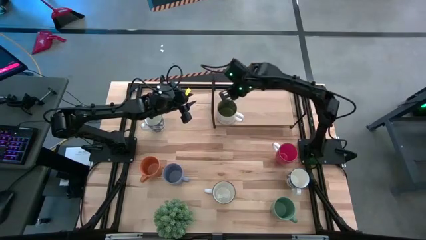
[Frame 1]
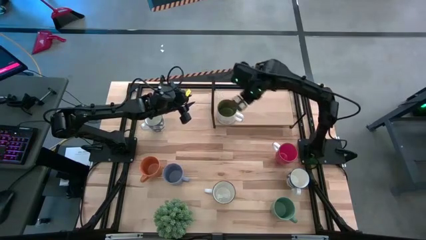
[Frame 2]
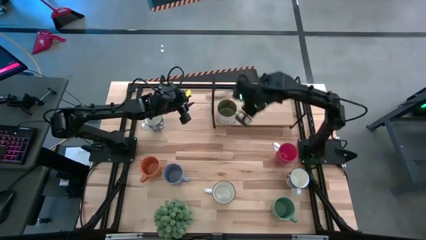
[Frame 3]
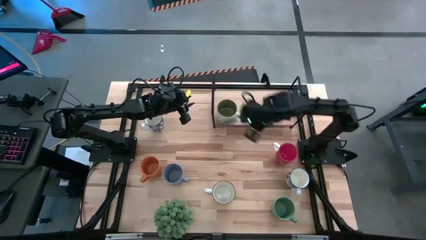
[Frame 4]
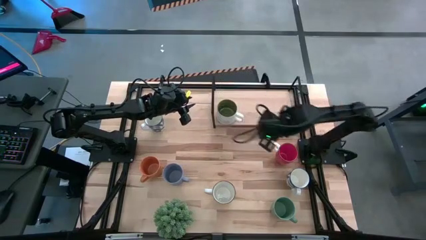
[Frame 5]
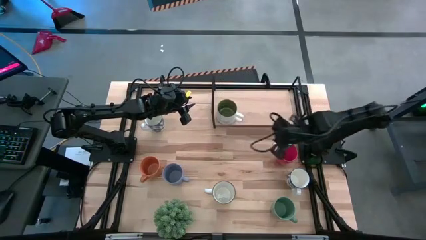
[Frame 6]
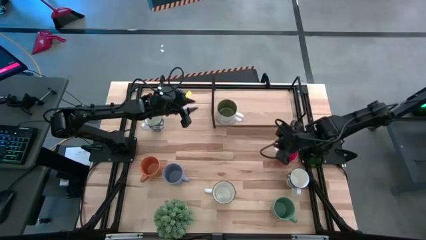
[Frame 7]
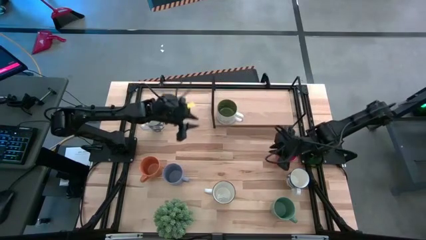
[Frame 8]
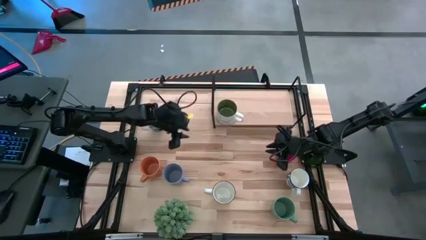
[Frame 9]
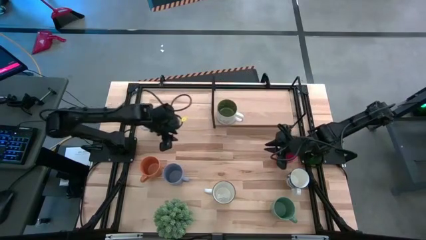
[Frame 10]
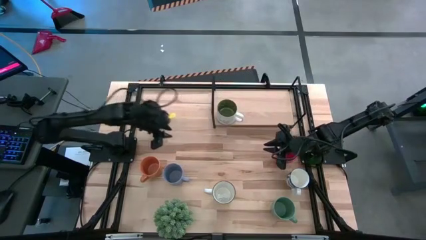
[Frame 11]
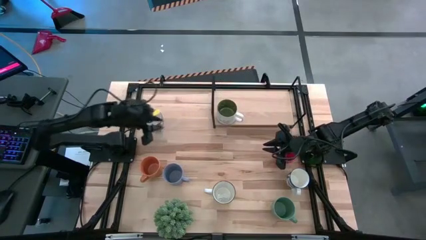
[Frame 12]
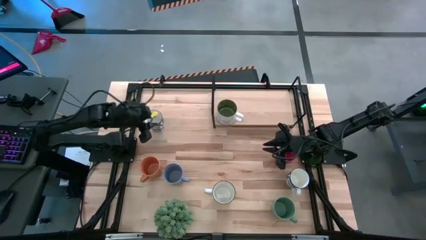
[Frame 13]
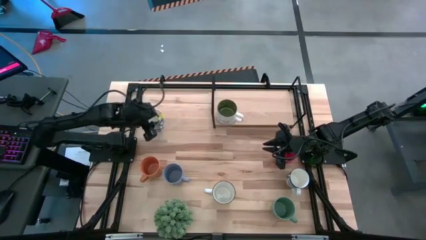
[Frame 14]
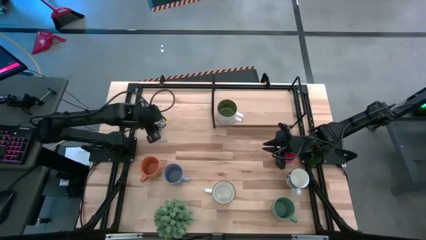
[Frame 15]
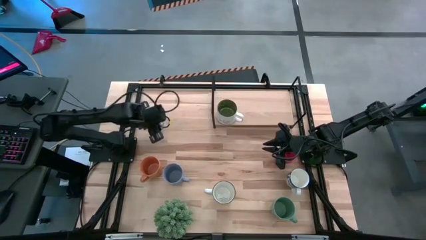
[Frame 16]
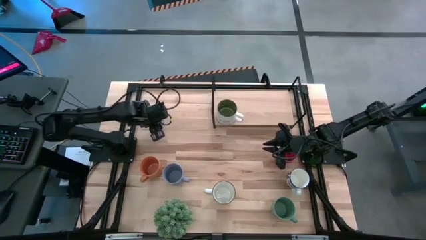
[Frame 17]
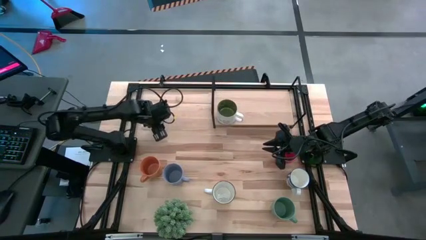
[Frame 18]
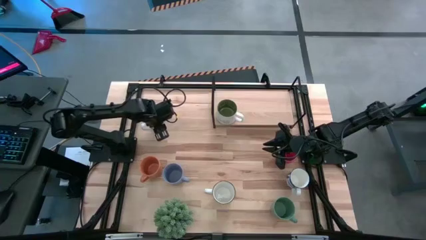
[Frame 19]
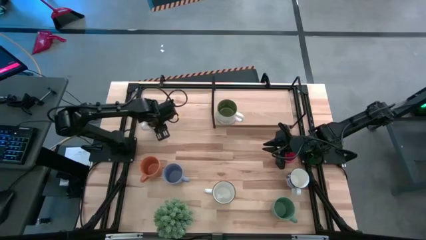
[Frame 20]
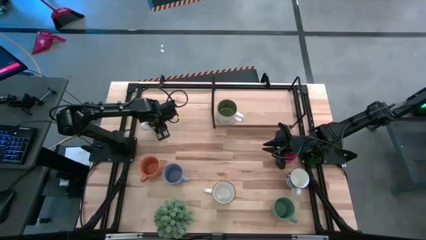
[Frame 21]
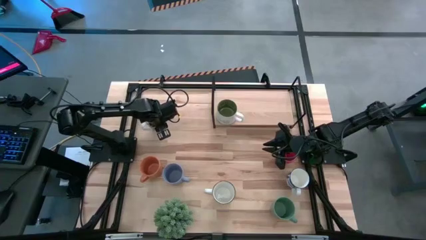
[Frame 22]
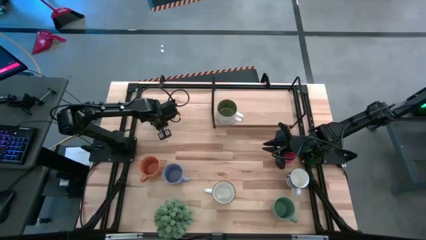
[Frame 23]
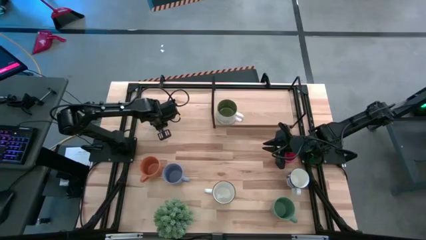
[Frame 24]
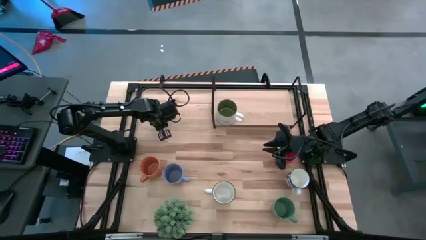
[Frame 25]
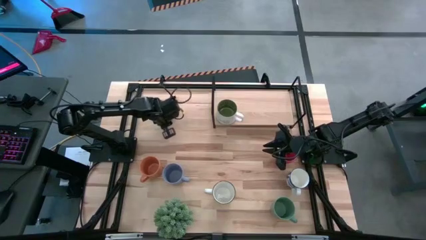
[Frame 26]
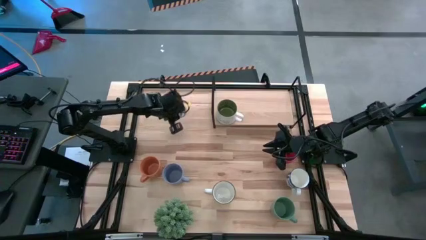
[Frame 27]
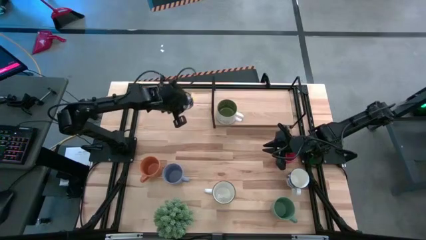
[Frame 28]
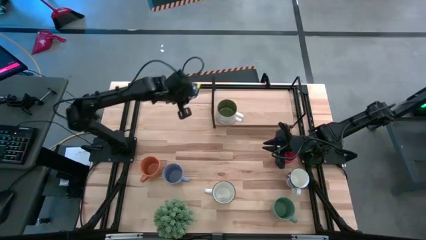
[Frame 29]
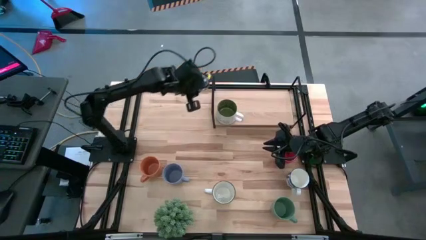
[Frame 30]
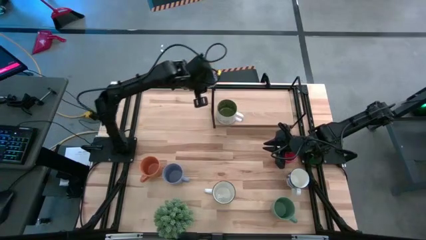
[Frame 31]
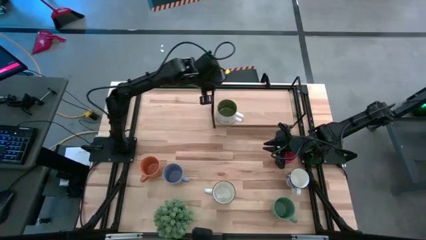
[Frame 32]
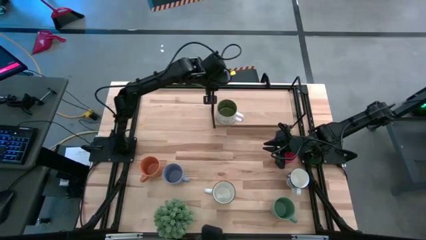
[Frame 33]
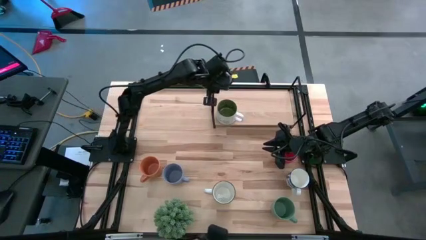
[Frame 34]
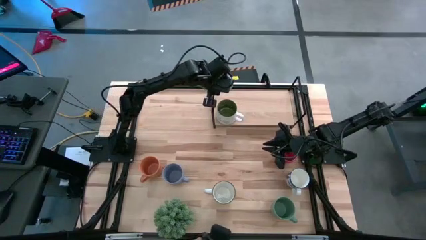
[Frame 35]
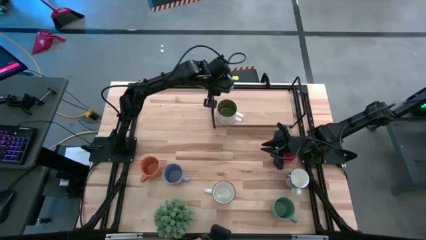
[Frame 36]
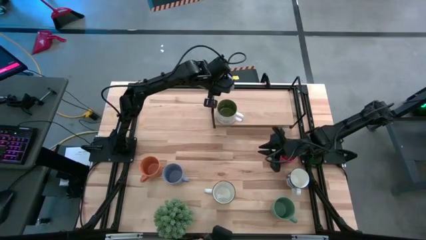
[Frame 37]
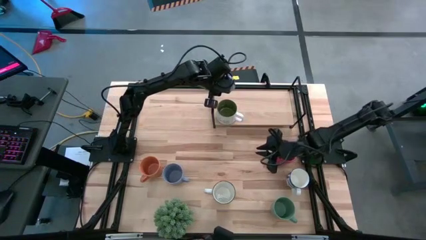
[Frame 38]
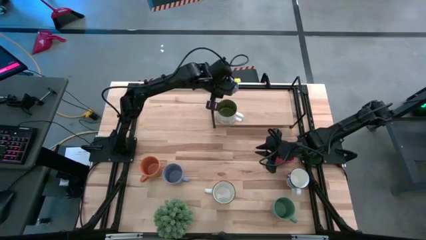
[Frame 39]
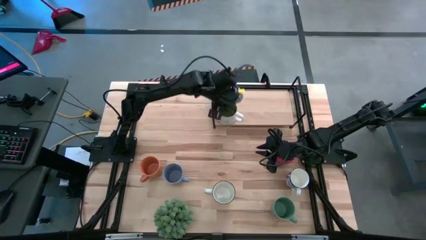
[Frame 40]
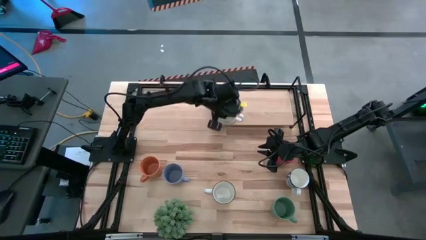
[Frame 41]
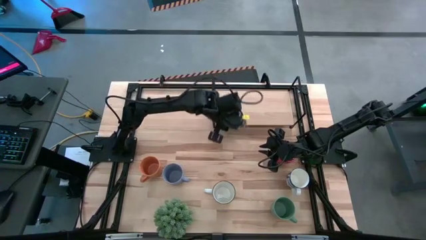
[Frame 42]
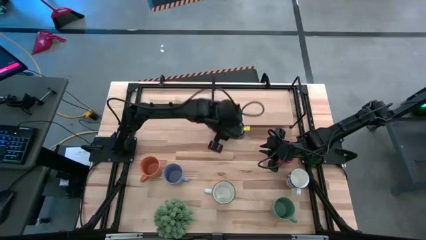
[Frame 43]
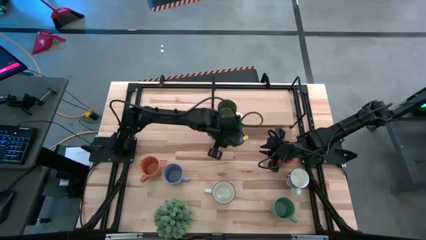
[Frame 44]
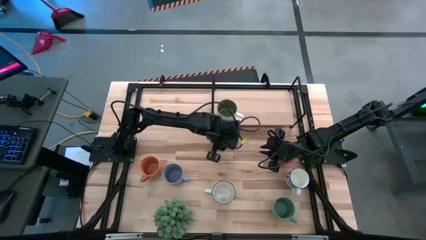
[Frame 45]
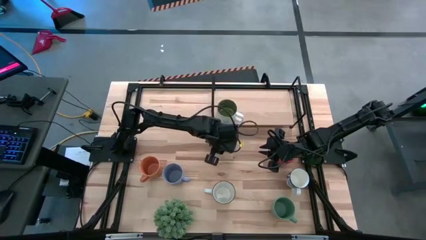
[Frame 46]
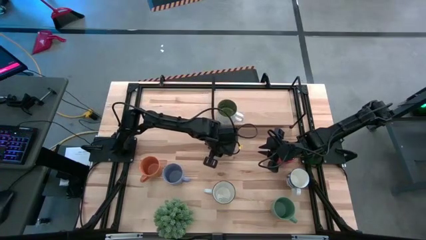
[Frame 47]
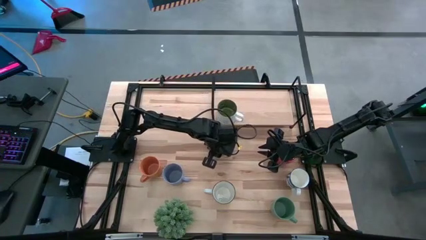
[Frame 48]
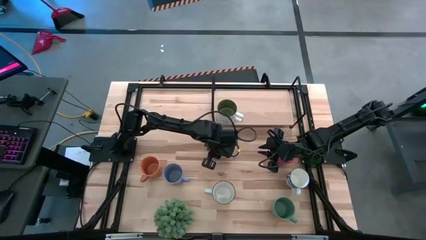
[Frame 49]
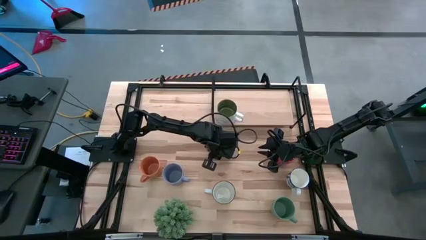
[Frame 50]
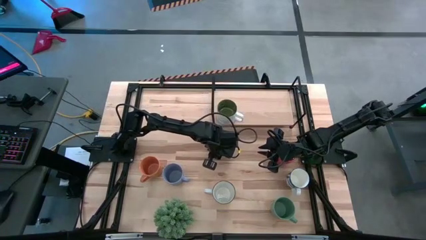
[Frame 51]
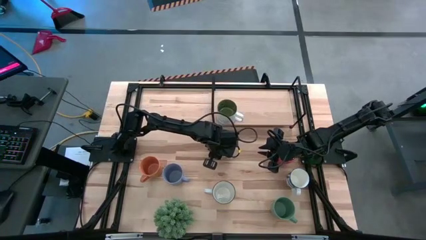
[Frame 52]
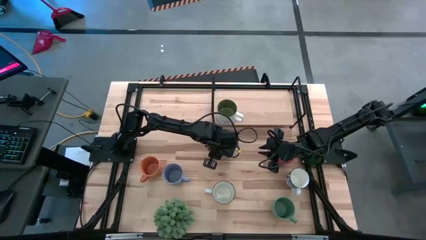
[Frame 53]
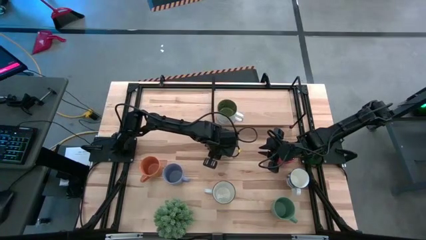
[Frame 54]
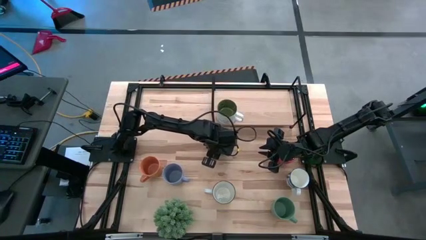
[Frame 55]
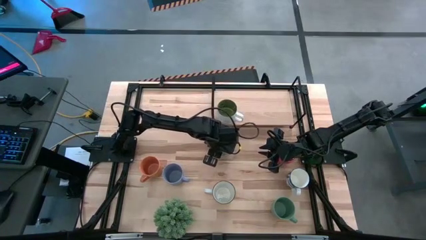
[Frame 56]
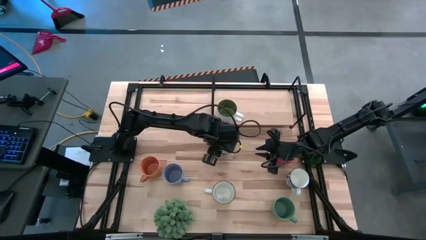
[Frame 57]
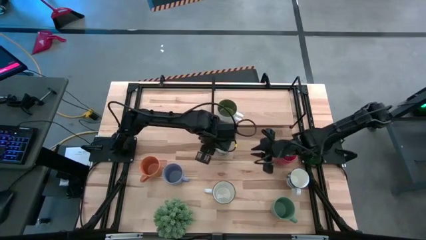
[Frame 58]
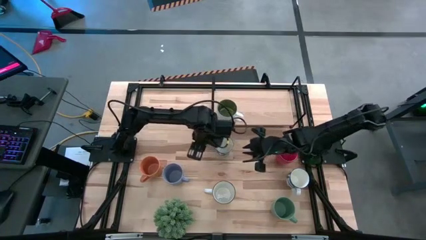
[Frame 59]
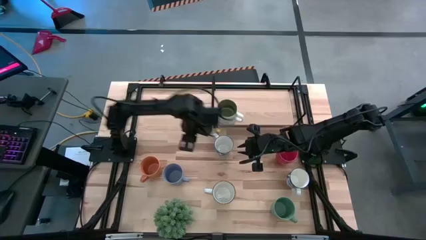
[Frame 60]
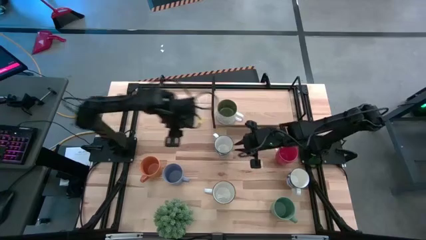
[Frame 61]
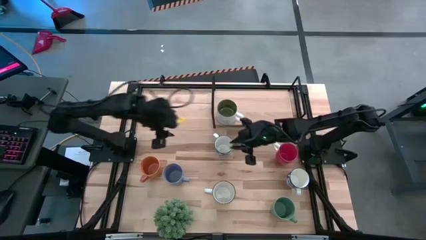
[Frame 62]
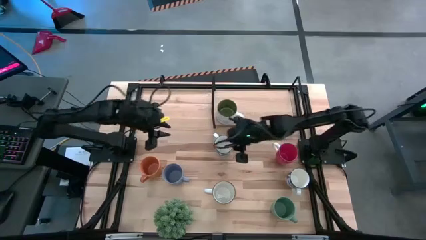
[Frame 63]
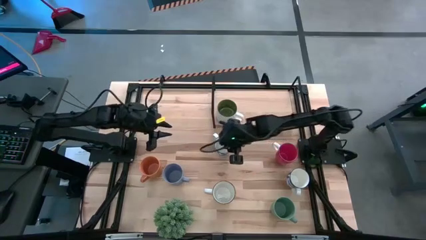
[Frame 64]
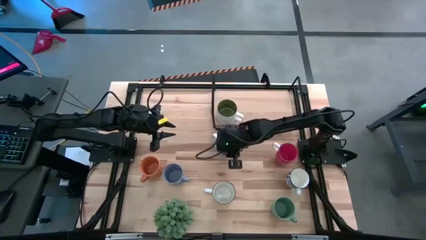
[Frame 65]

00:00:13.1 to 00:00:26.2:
Task: Place coffee mugs
Put the left blue patterned mug on the shelf
